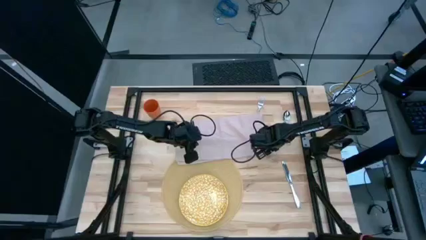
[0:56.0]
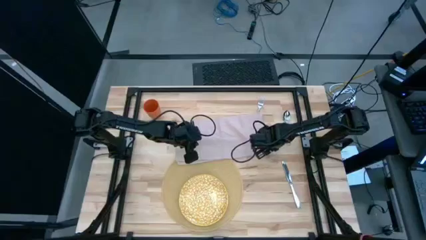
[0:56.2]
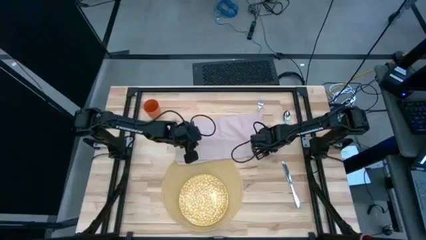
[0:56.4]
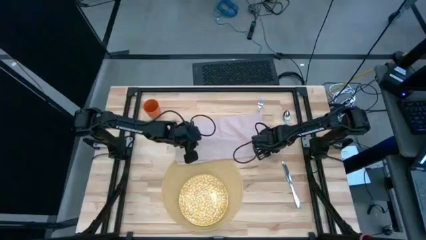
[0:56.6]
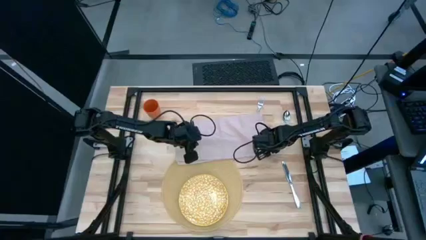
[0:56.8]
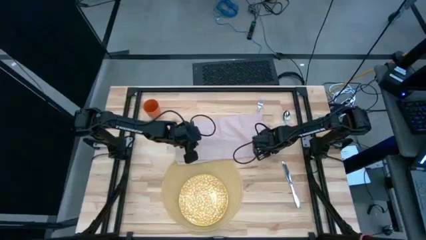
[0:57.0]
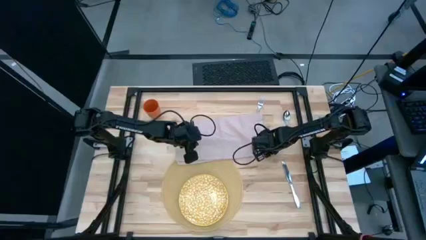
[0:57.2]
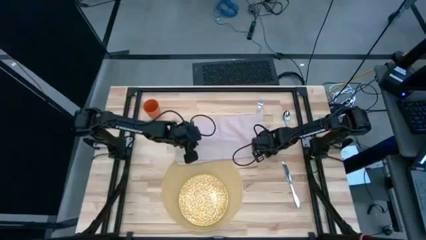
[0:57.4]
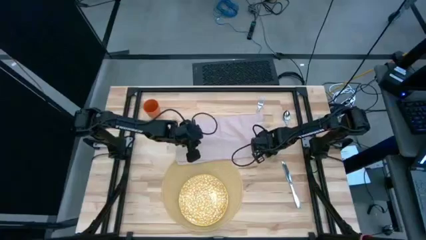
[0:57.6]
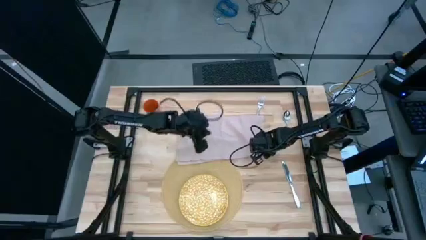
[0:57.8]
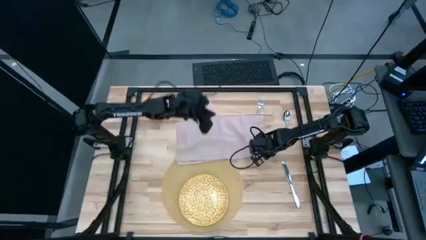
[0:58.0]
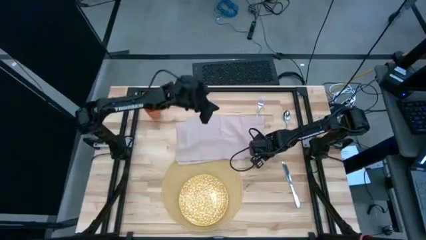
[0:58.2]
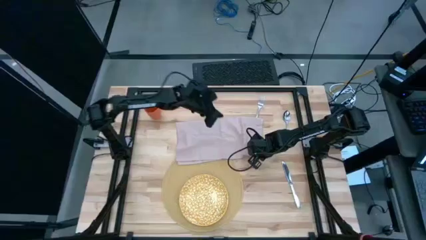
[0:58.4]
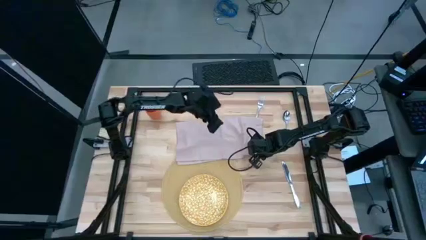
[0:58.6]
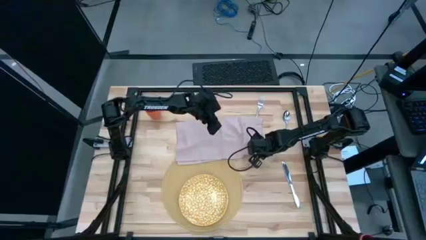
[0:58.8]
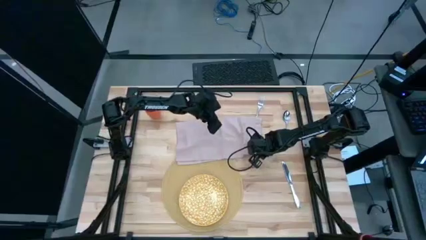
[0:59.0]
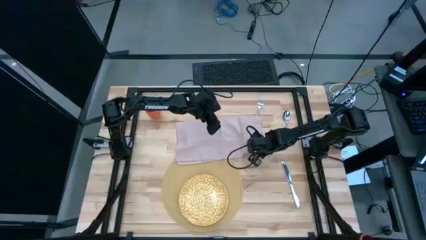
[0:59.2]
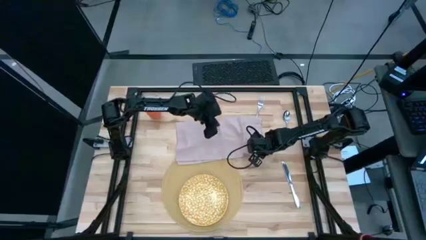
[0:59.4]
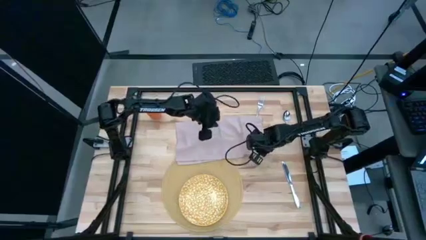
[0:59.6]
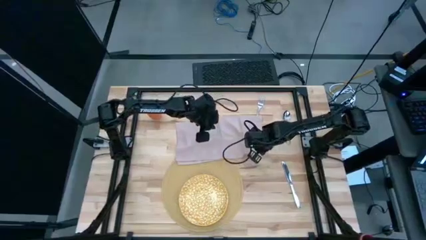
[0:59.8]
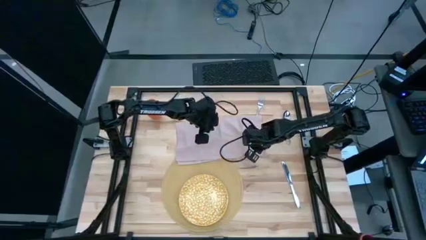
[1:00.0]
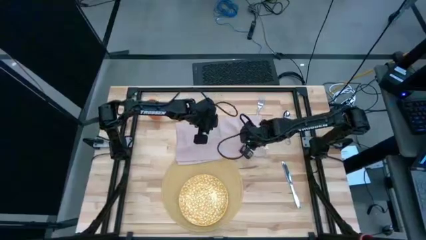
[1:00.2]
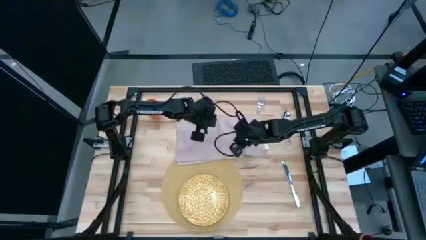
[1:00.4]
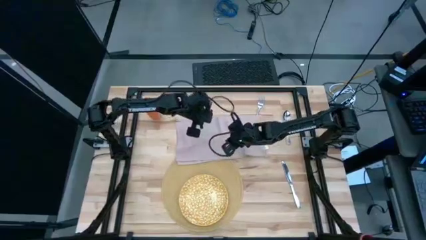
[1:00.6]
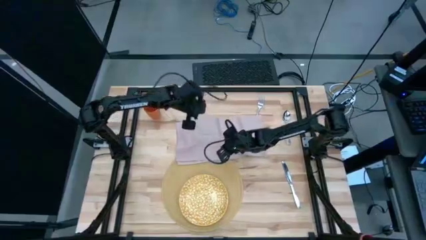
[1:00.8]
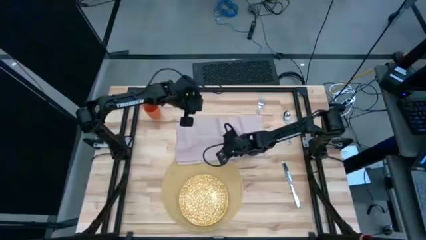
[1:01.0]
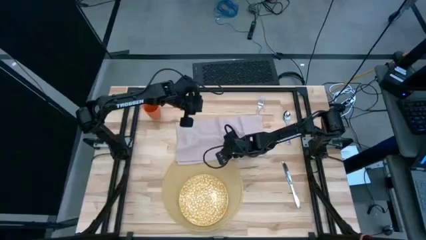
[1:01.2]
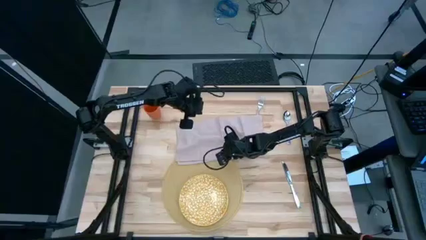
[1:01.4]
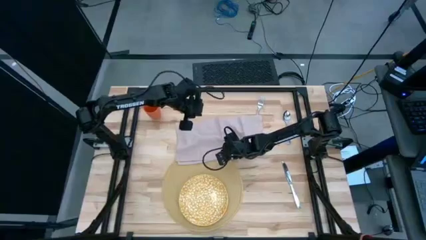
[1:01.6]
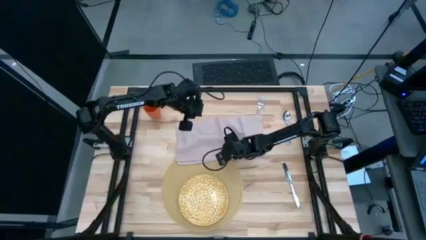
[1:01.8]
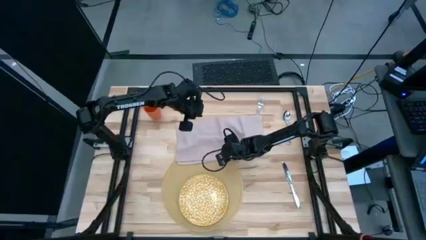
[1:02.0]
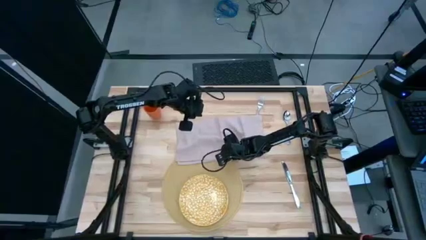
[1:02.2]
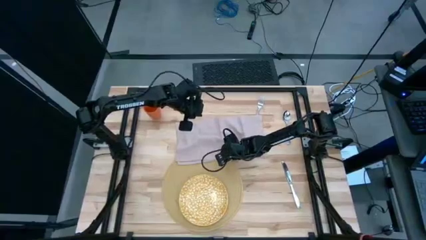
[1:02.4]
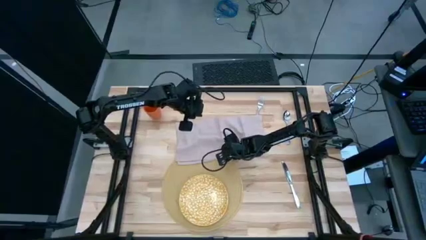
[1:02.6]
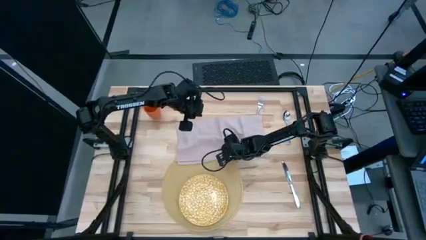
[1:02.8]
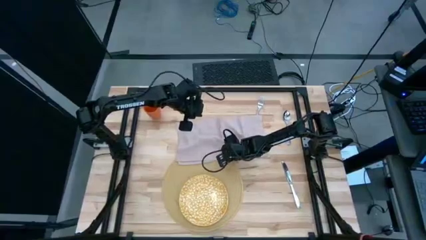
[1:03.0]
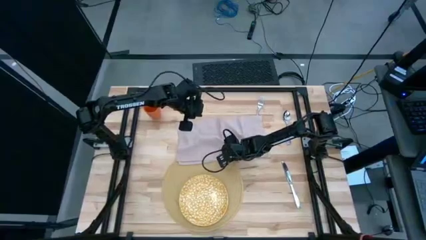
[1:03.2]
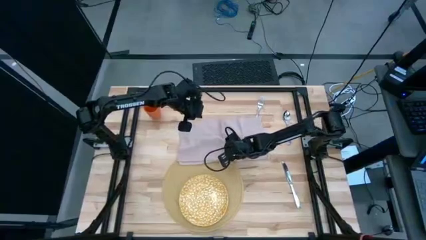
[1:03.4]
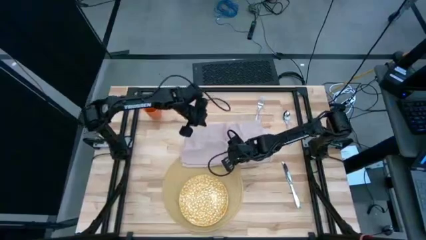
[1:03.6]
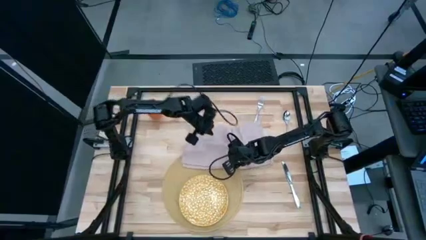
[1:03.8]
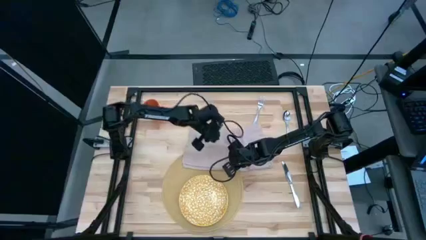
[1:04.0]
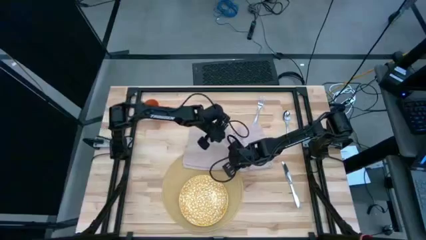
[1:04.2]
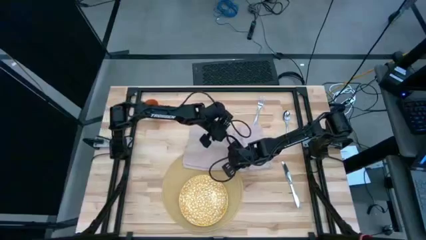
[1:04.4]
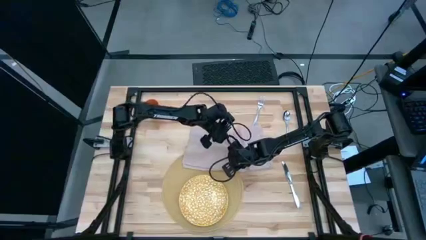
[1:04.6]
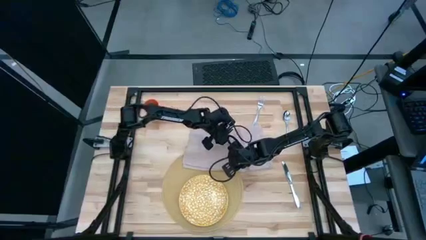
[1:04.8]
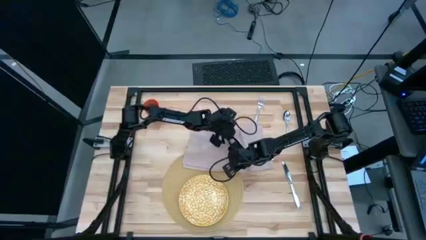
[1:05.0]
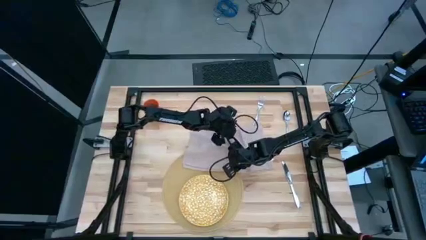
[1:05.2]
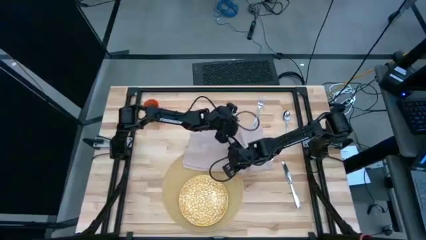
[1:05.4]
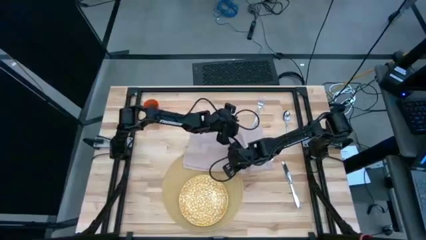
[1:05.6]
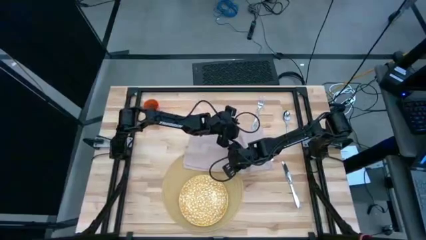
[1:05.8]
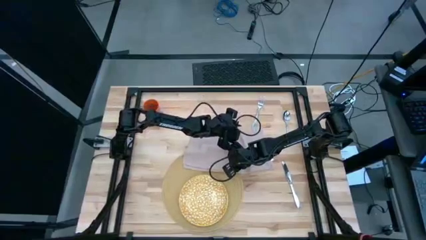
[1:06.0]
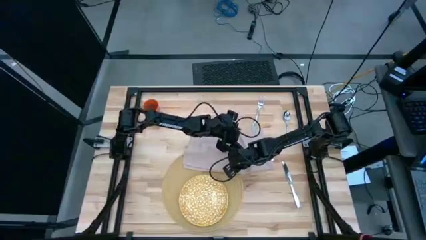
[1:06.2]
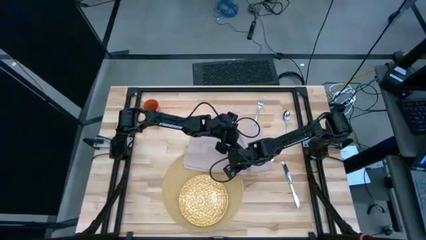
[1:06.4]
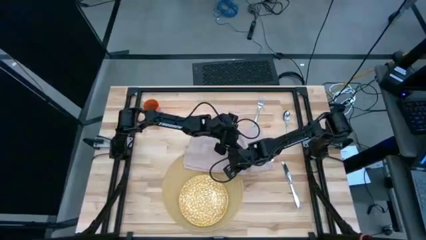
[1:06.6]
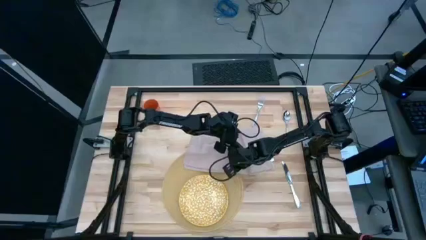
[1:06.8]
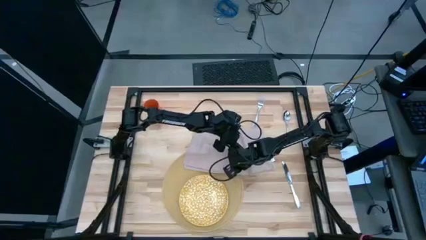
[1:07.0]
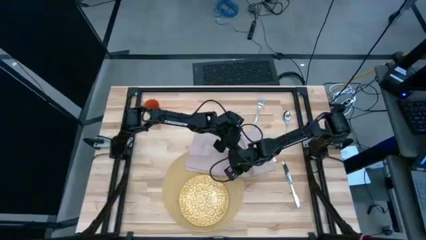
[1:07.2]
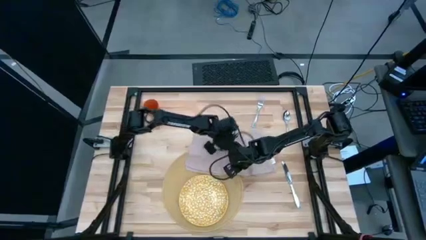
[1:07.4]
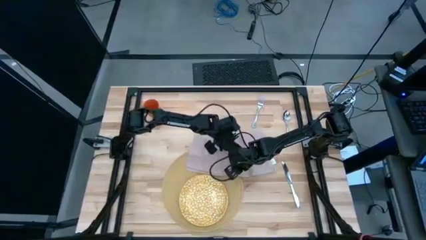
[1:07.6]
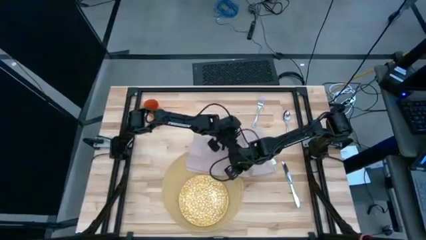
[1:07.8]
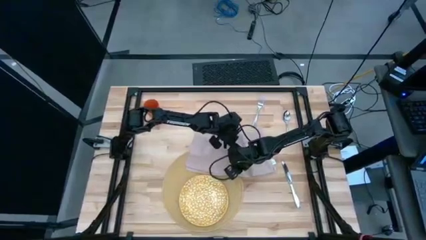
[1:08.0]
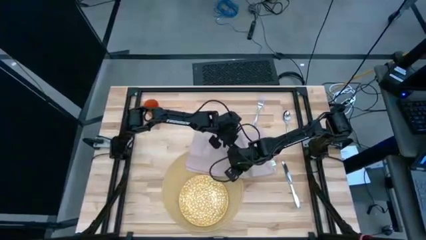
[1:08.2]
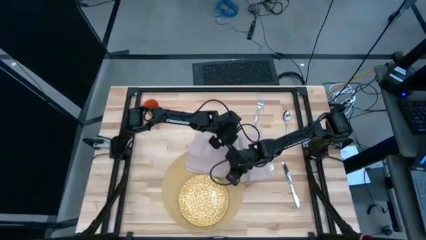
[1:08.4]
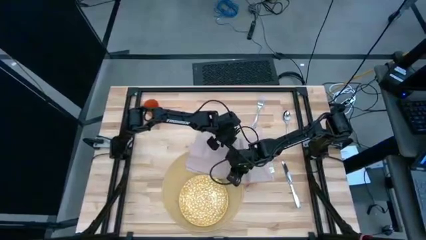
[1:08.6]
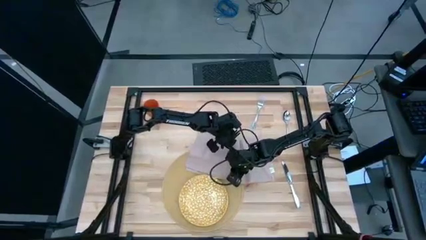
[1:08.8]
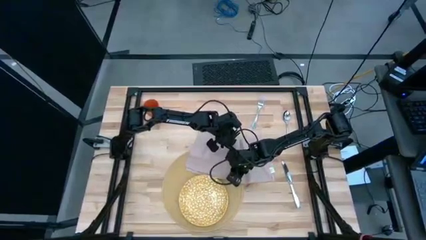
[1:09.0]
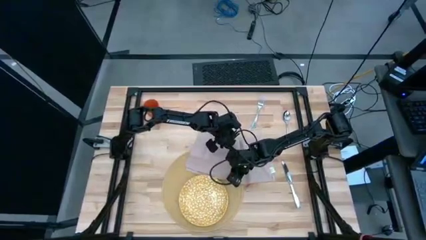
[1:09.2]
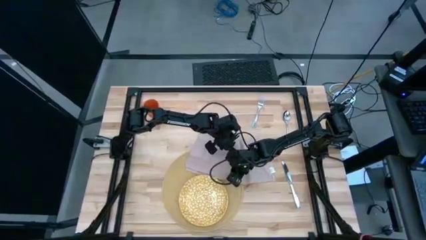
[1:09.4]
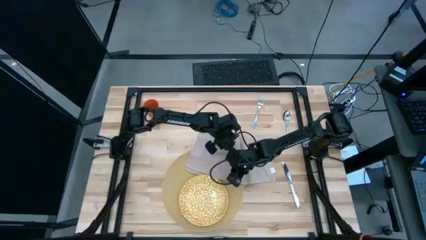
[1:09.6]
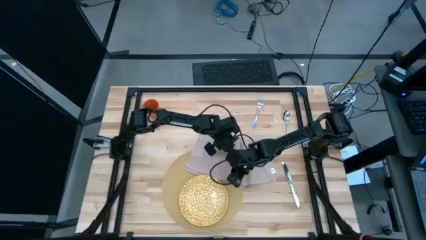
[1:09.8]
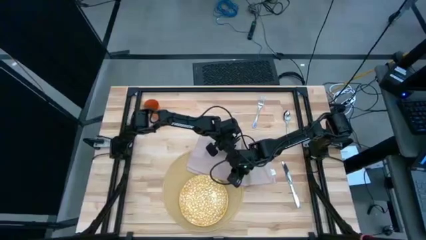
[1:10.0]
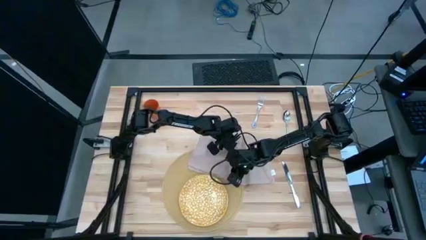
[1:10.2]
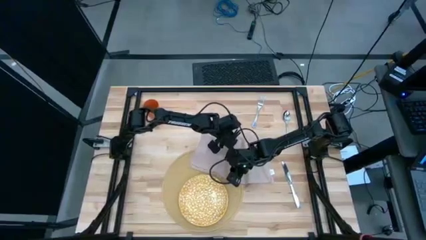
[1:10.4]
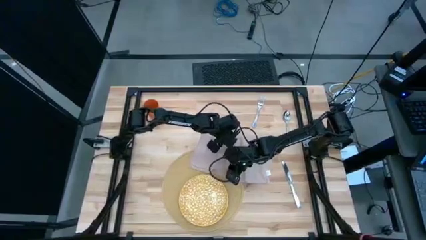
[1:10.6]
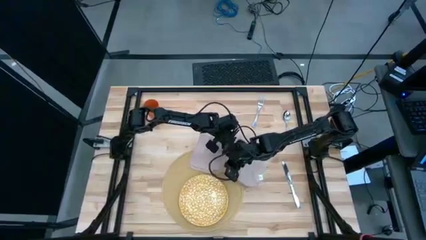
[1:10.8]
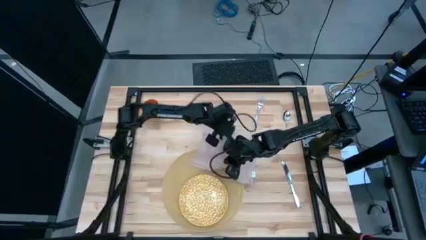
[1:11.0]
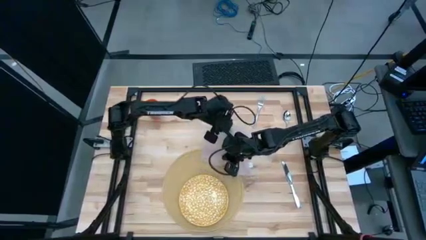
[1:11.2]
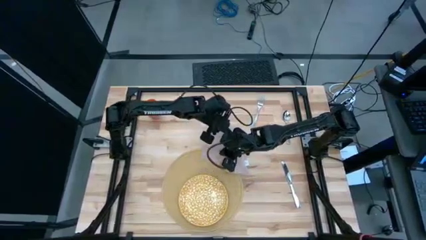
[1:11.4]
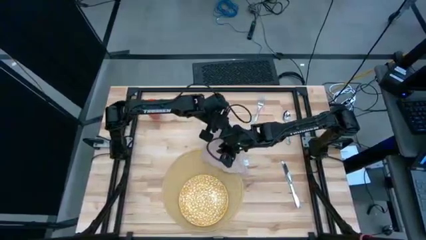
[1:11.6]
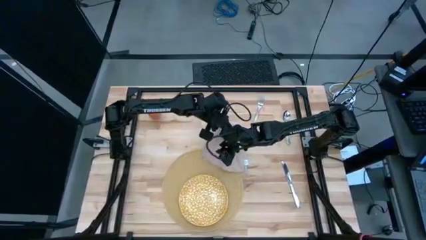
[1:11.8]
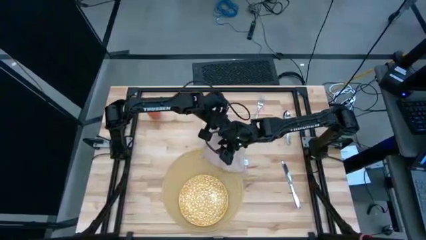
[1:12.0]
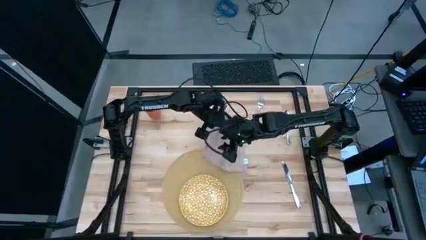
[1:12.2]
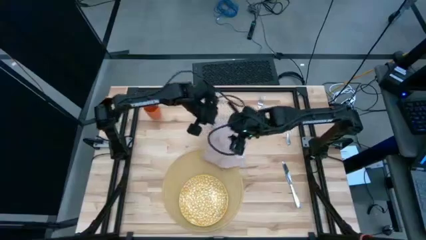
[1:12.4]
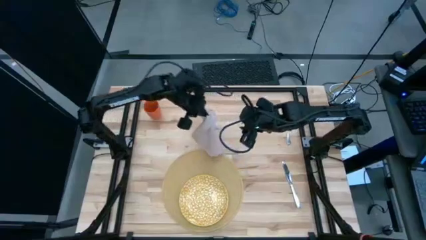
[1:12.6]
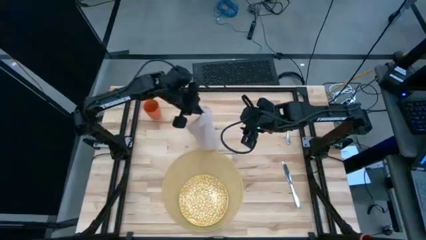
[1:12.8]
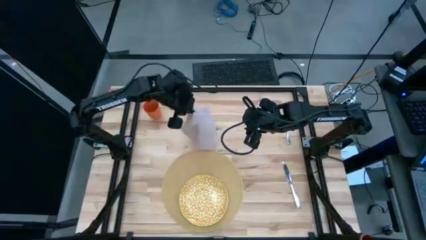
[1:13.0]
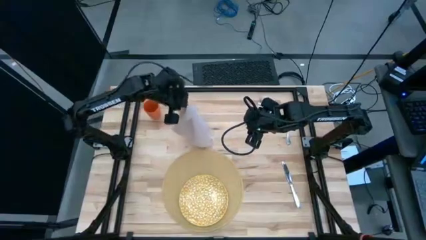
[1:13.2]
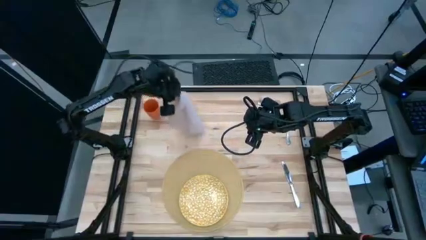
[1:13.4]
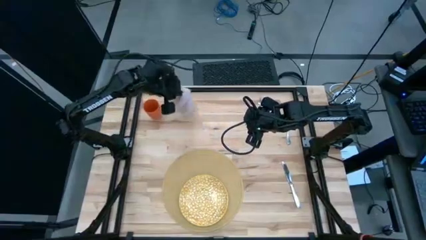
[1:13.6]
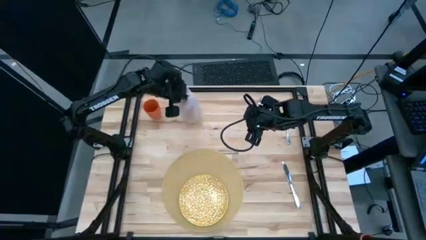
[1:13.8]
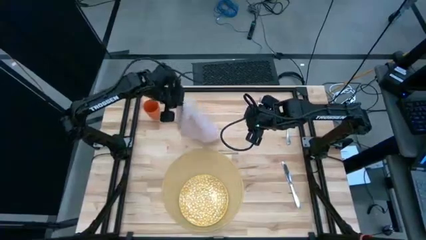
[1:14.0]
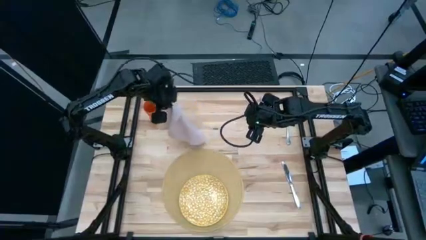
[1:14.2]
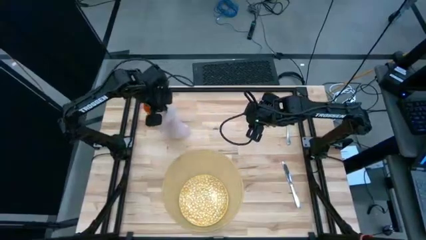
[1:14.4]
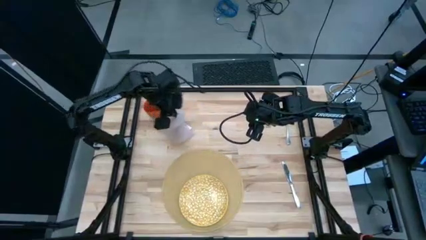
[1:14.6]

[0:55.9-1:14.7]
Task: Set table place
Fold the light orange napkin on the table
